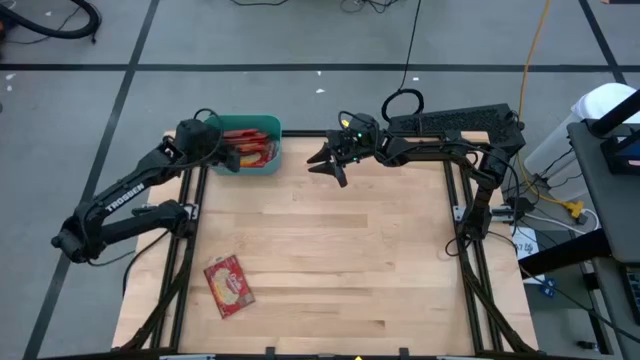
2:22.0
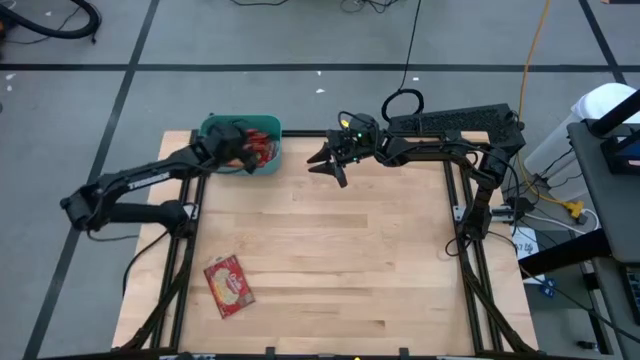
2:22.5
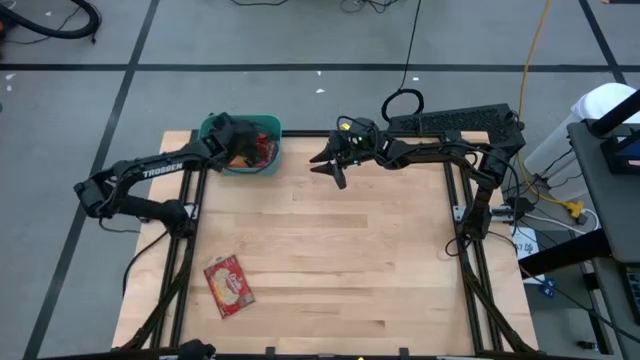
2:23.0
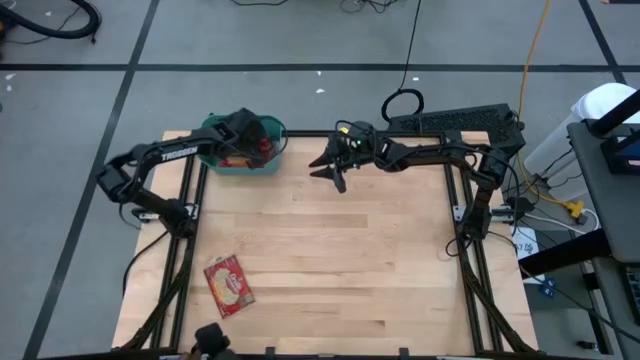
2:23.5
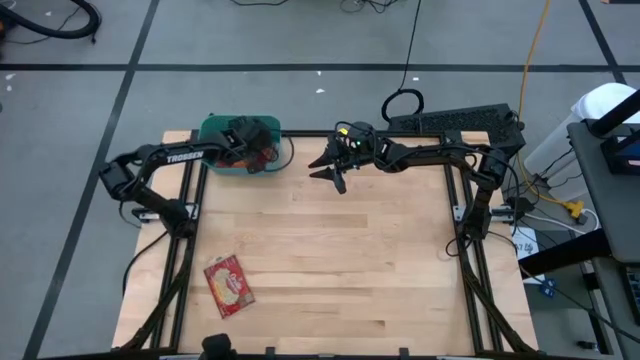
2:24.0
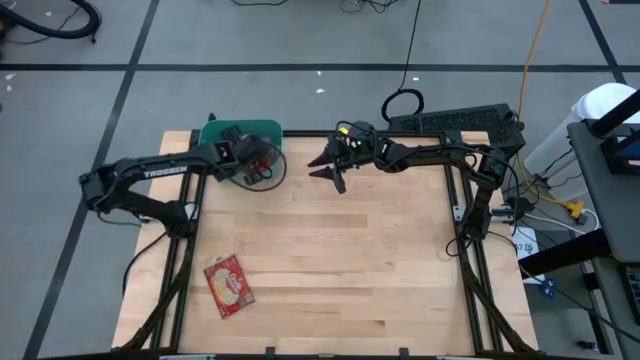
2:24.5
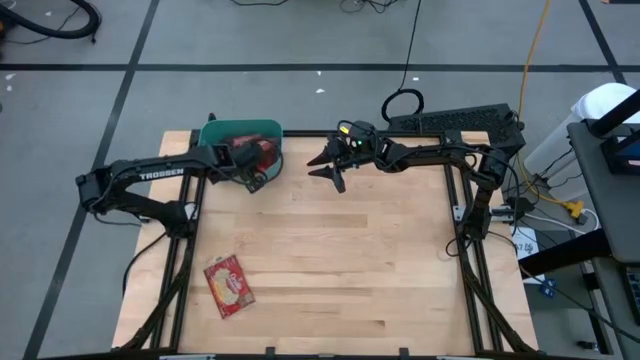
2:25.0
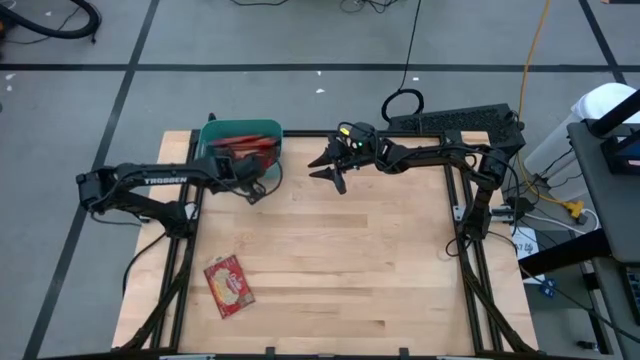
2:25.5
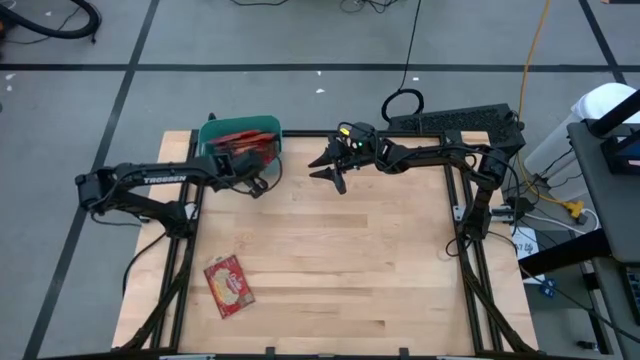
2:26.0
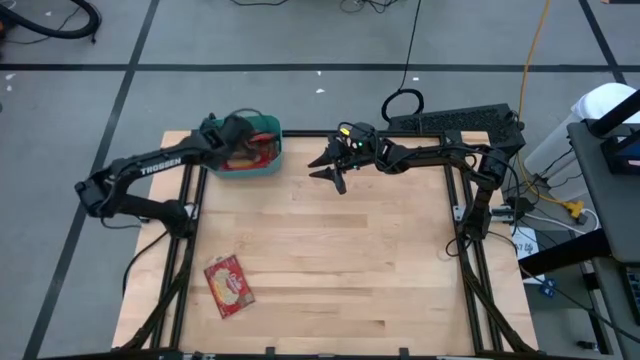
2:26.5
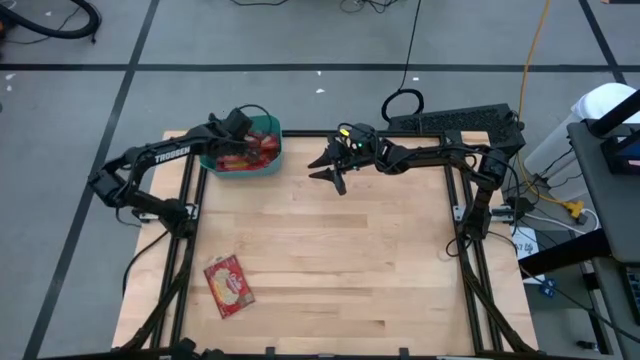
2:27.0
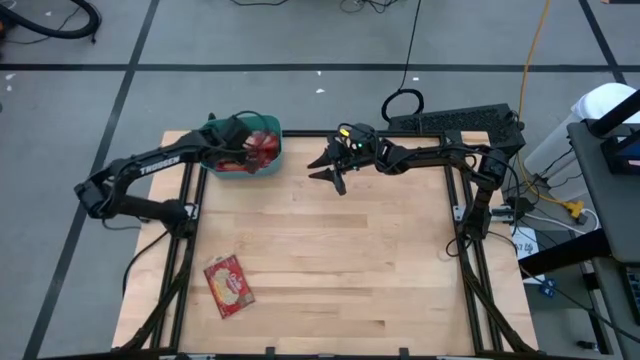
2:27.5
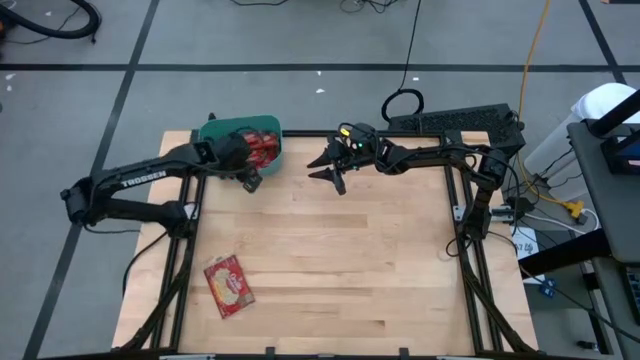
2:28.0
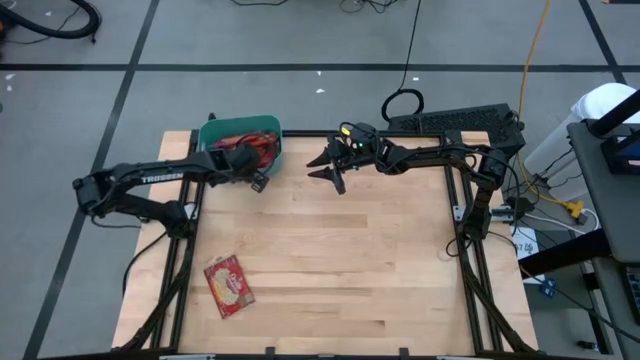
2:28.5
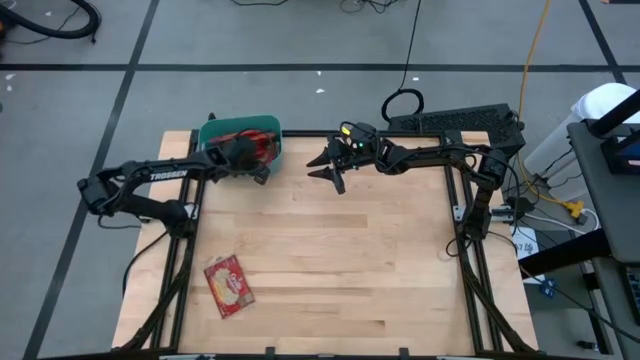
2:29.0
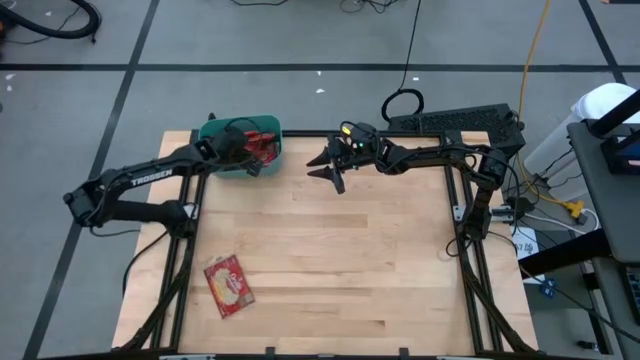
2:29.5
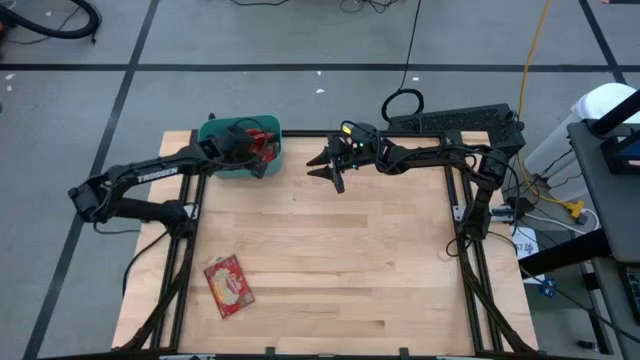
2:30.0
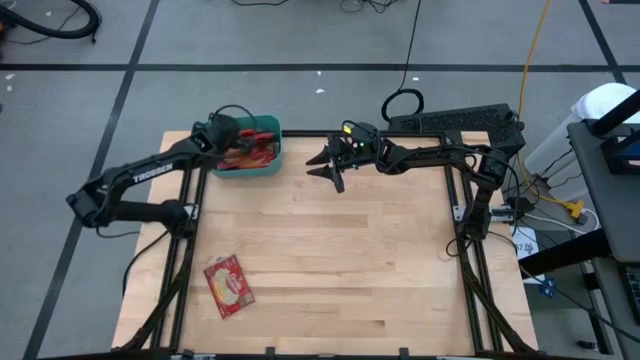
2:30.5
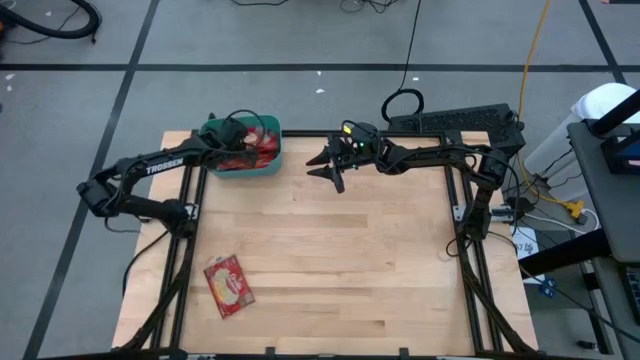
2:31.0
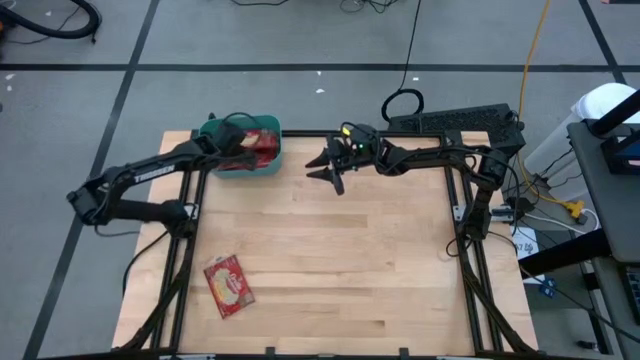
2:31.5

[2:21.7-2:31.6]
Task: Sort popcorn bags into baskets
Adjust the red popcorn bags in the green bin

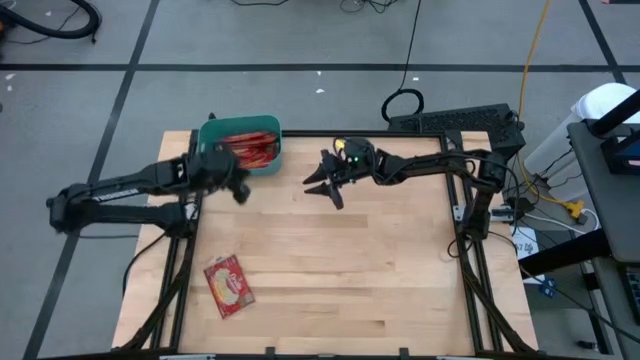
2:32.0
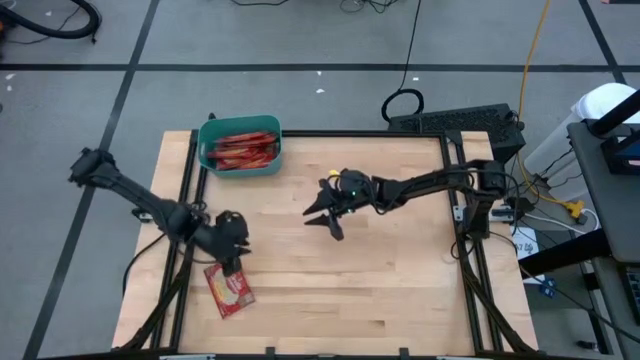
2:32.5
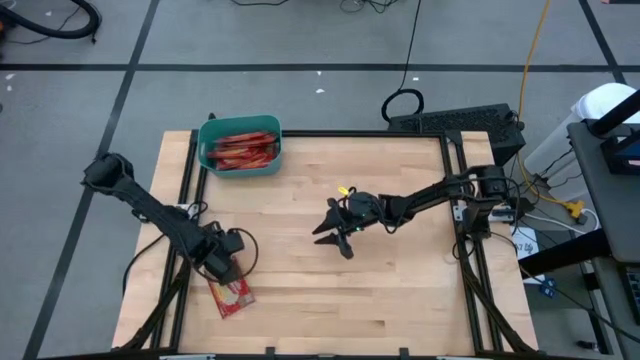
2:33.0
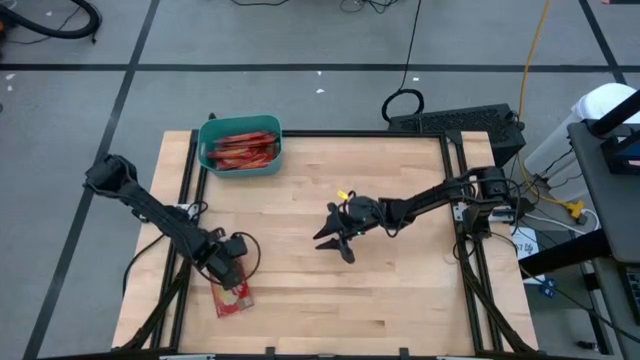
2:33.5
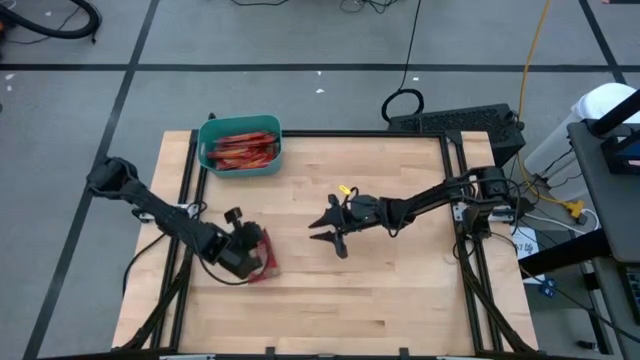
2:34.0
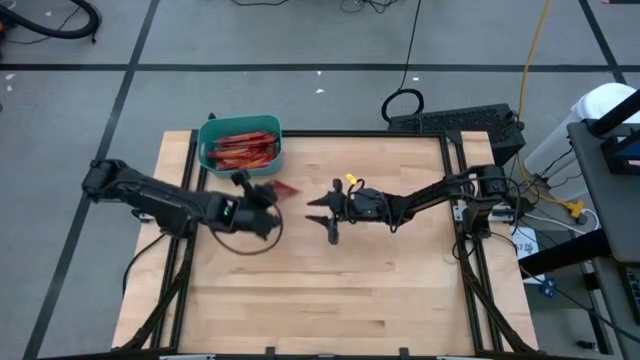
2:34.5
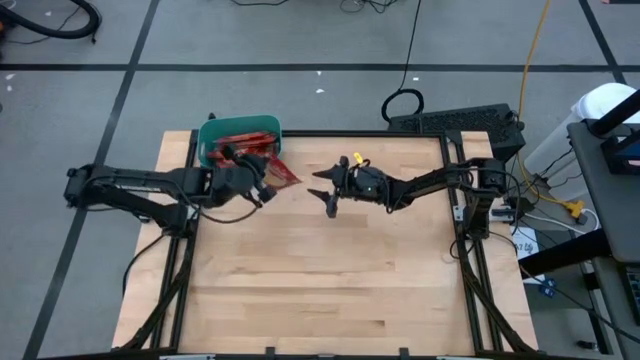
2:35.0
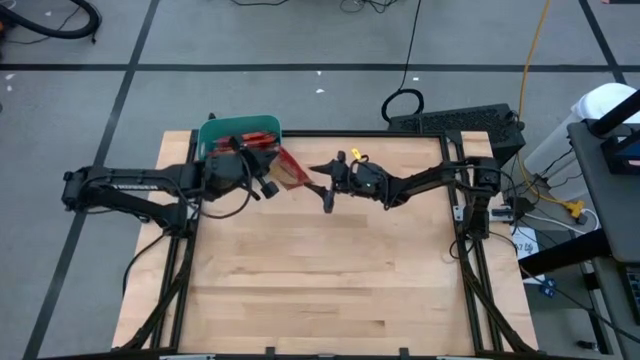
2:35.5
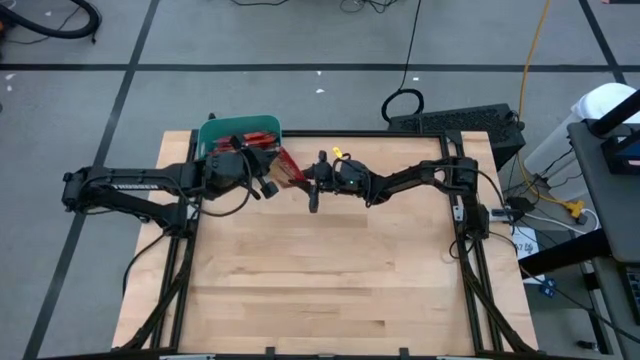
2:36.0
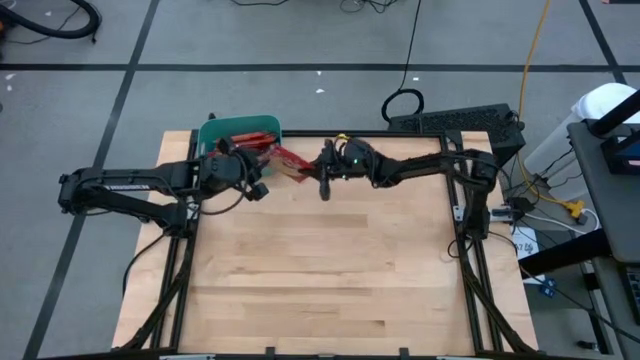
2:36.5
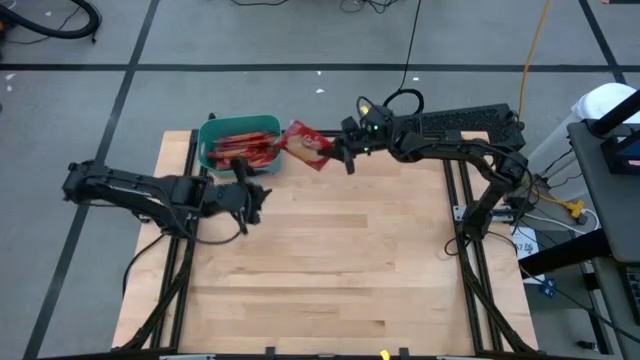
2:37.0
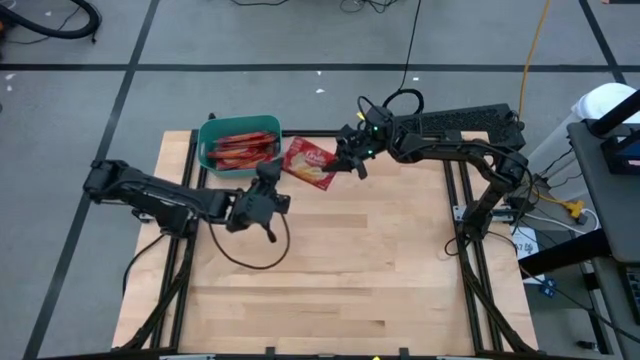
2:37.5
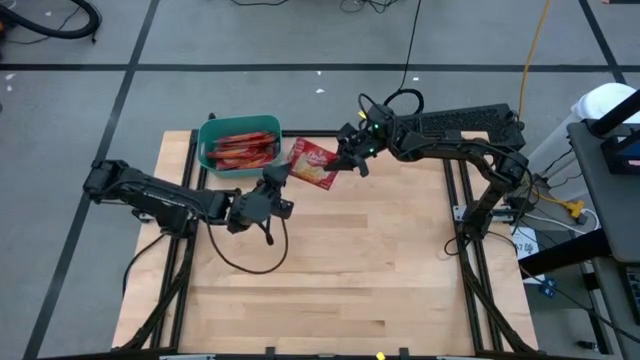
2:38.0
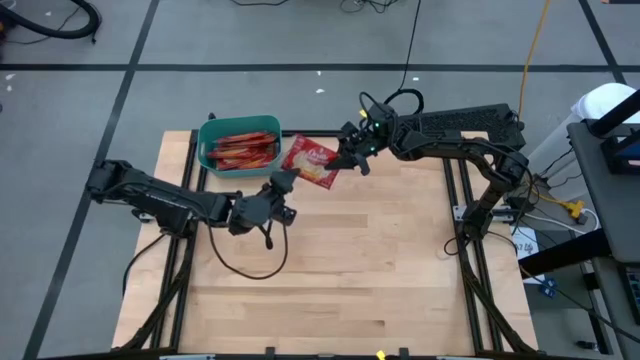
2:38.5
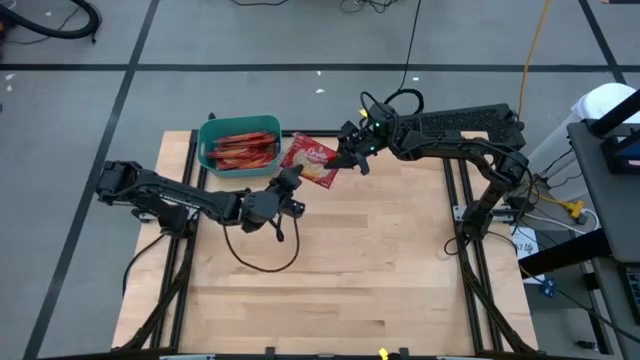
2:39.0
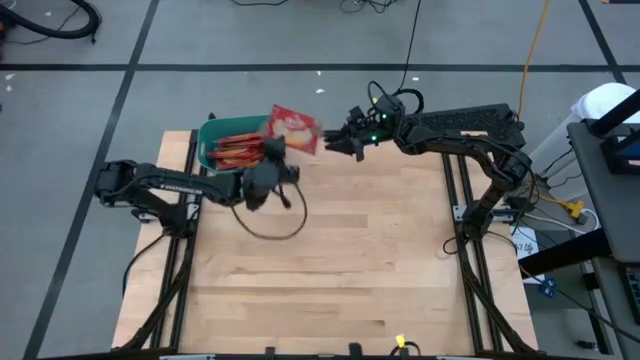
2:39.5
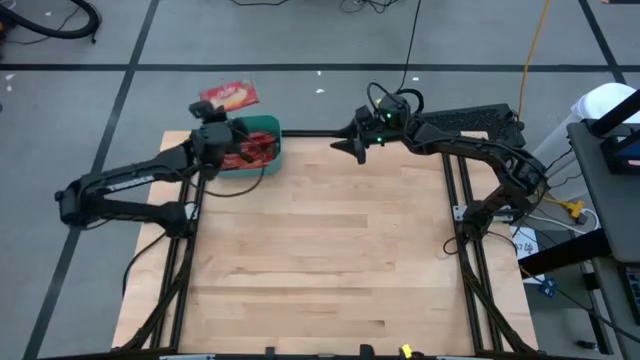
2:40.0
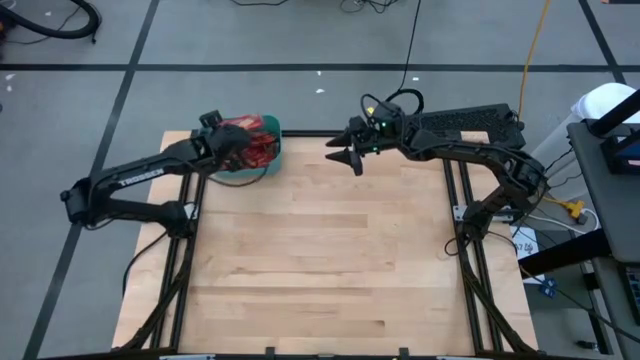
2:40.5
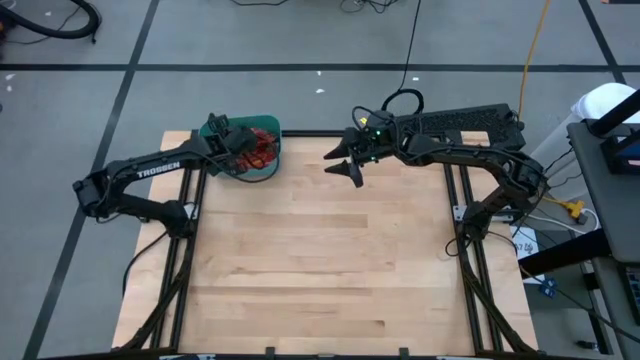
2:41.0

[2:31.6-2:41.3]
Put the red popcorn bag into the green bin

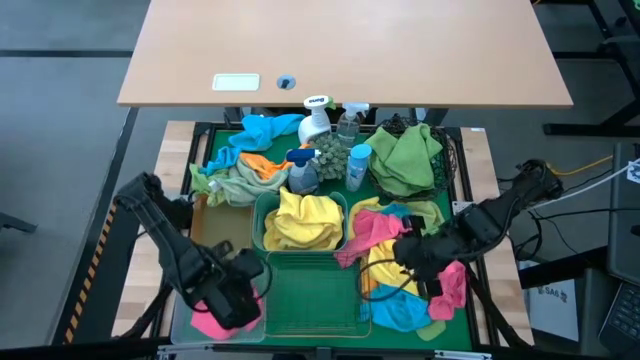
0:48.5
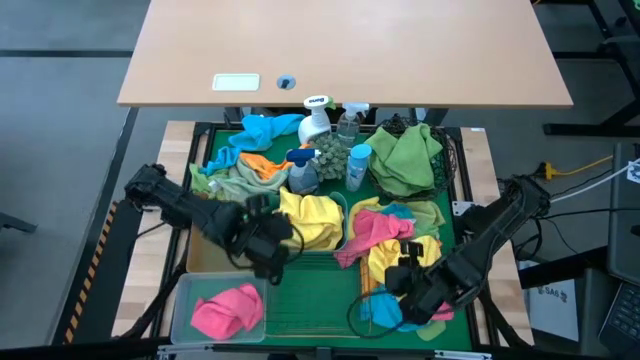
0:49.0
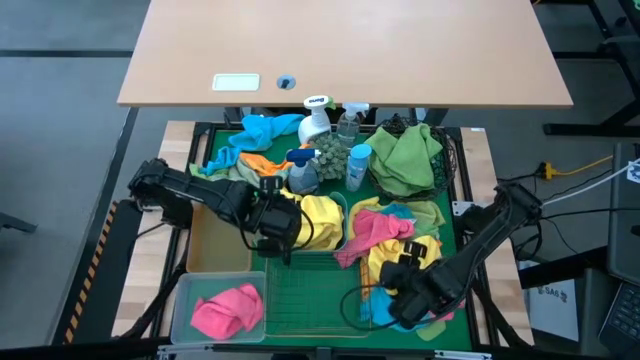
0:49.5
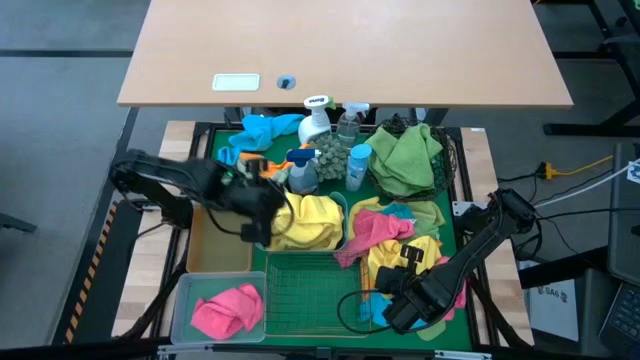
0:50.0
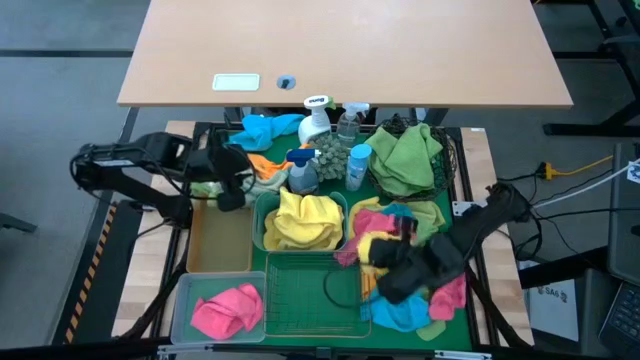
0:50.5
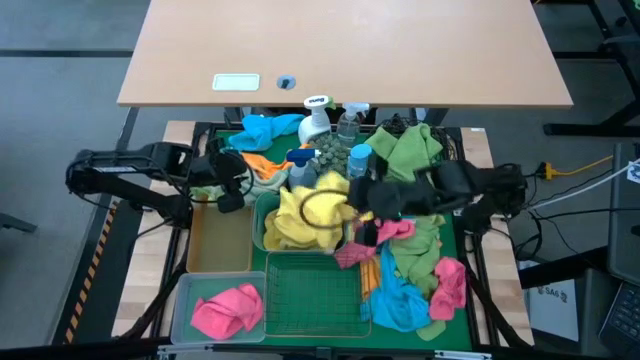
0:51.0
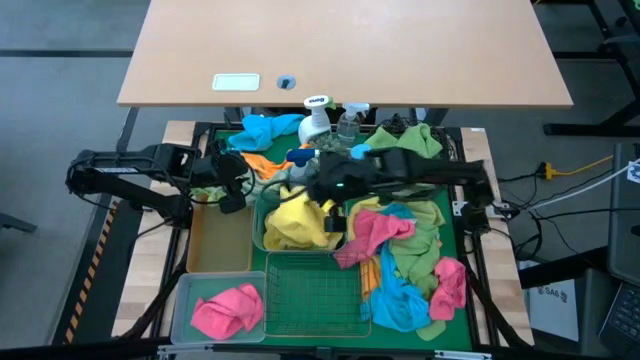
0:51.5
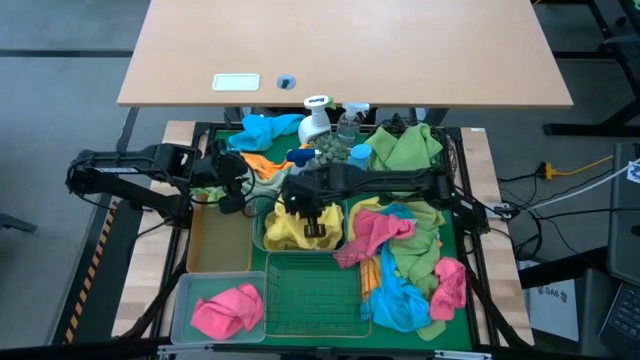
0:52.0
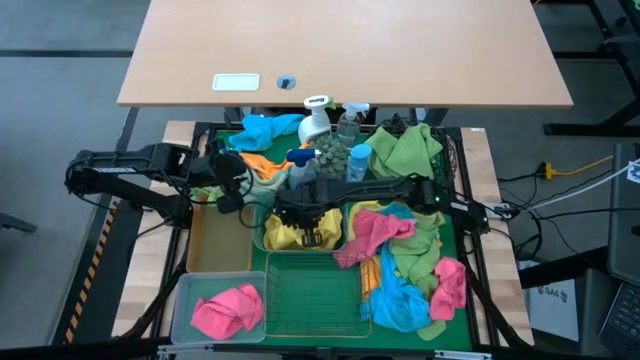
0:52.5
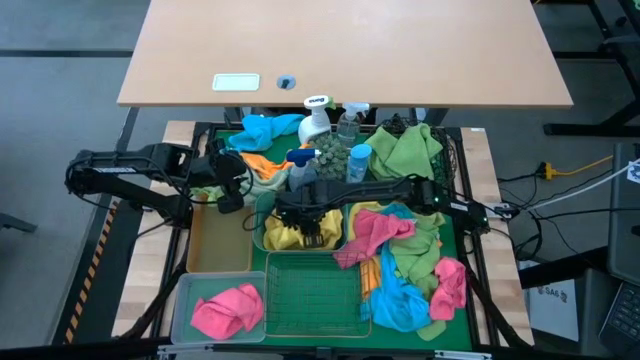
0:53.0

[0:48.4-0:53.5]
Task: Sort microfiber towel by color & place in baskets
Put the yellow microfiber towel into the blue bin
